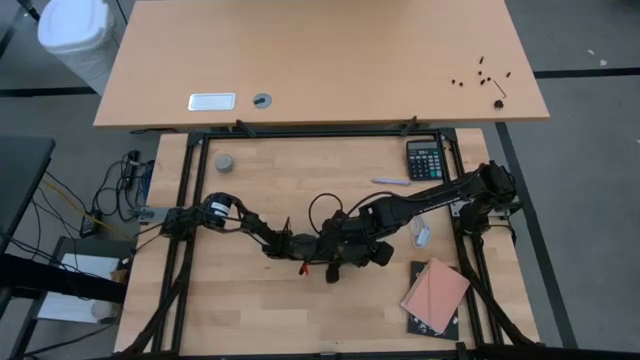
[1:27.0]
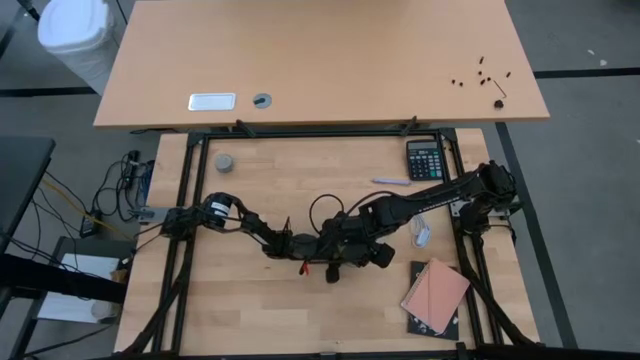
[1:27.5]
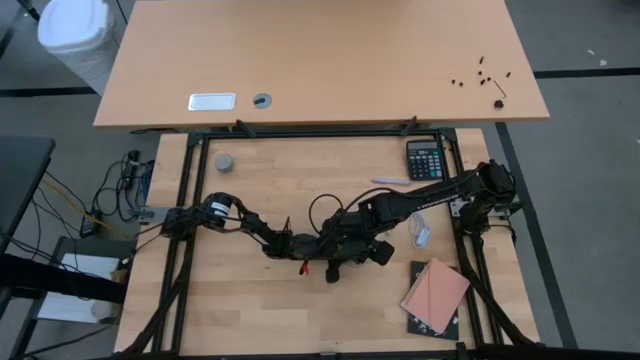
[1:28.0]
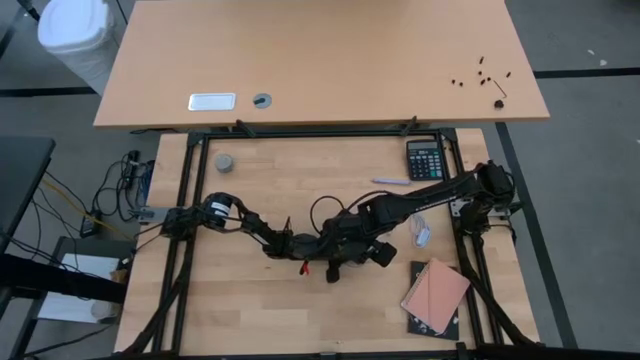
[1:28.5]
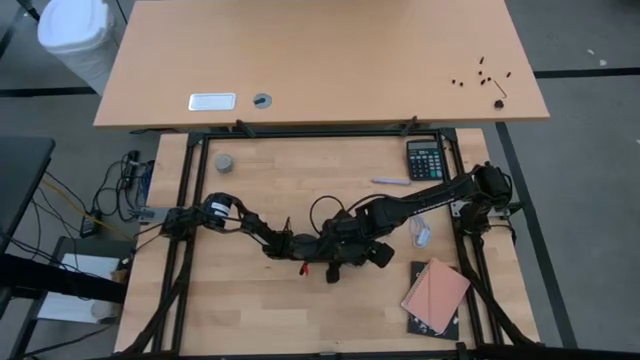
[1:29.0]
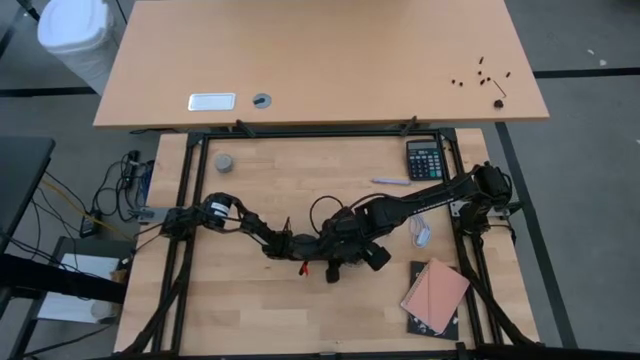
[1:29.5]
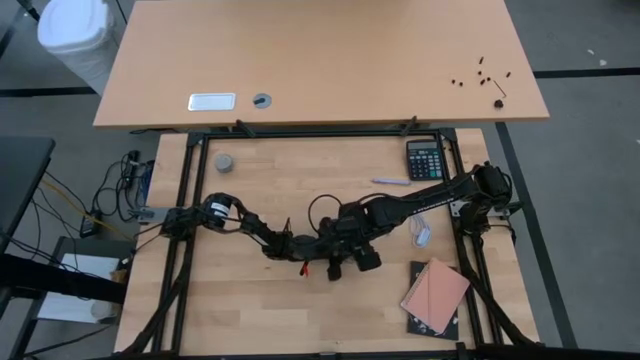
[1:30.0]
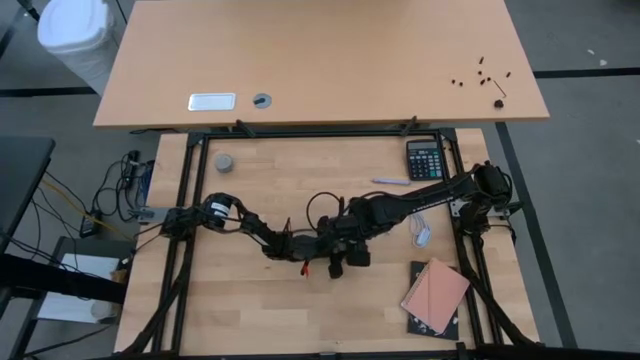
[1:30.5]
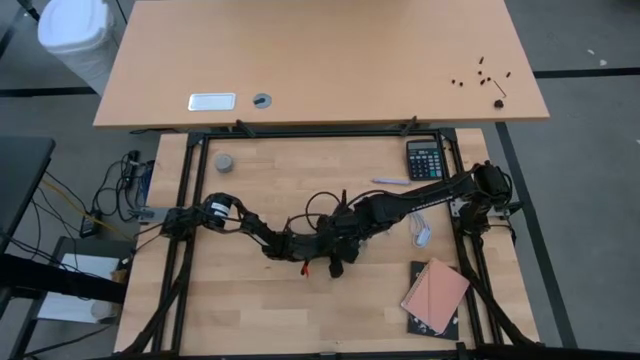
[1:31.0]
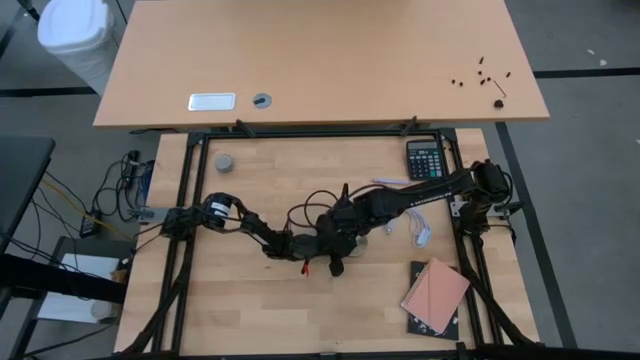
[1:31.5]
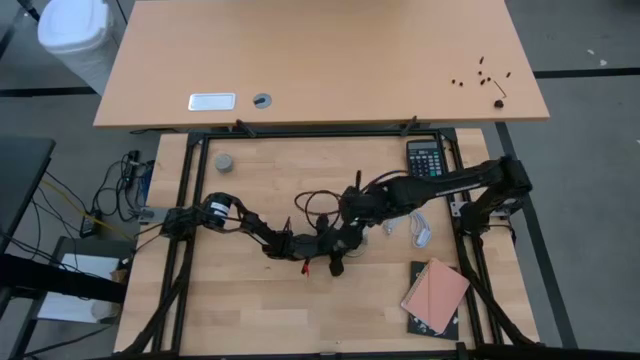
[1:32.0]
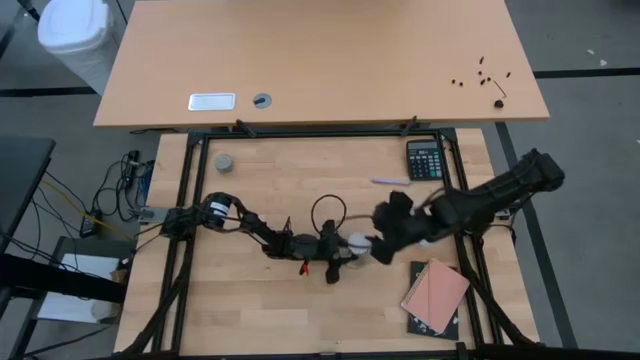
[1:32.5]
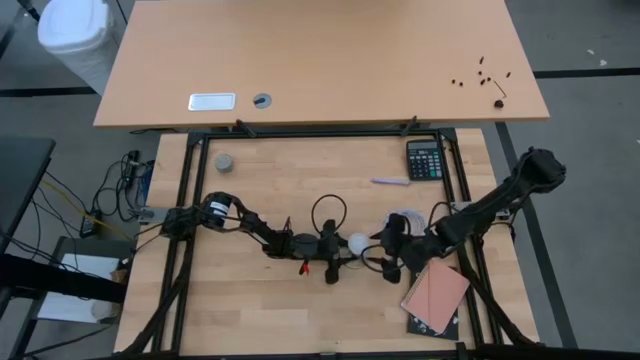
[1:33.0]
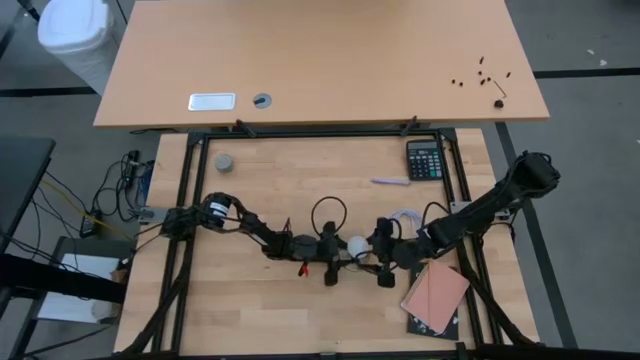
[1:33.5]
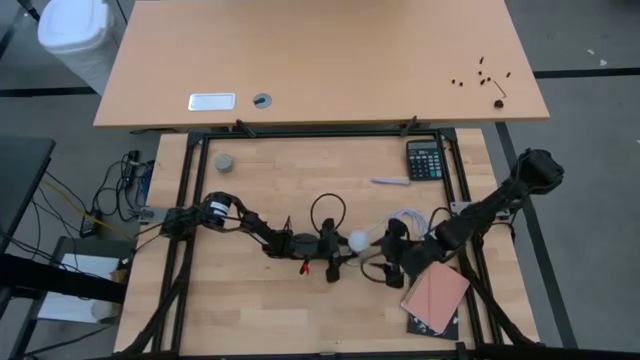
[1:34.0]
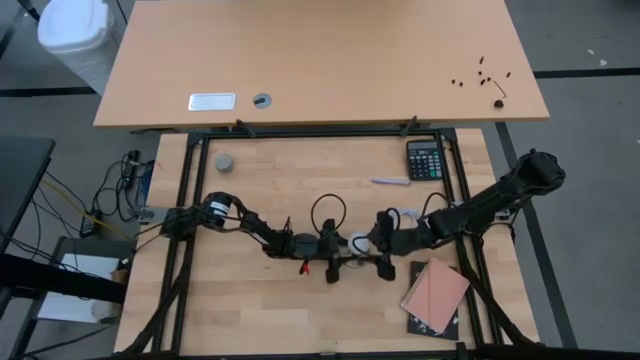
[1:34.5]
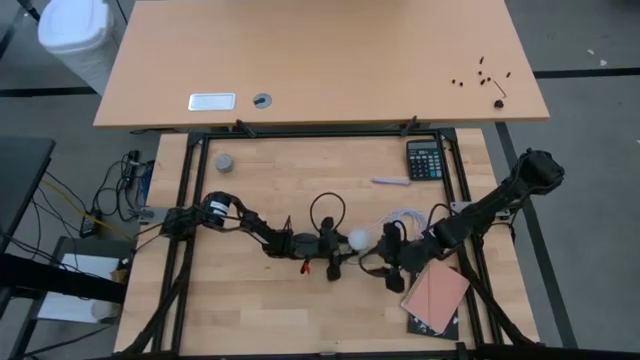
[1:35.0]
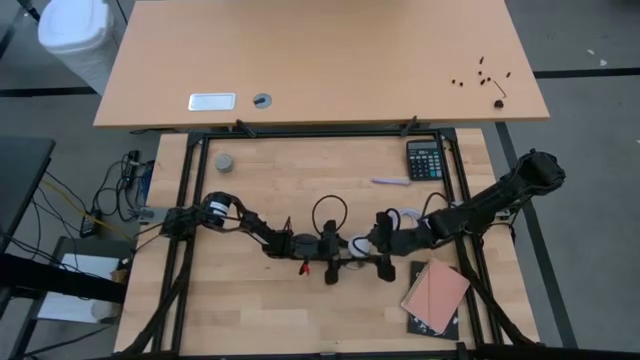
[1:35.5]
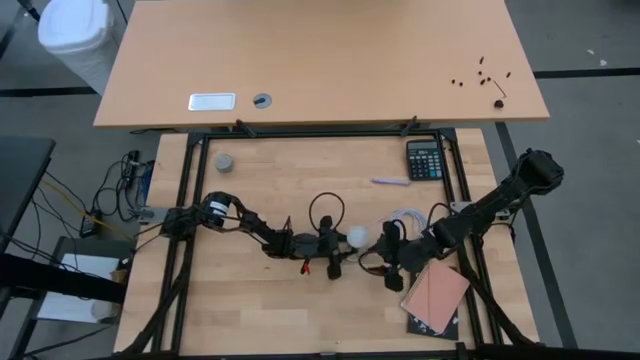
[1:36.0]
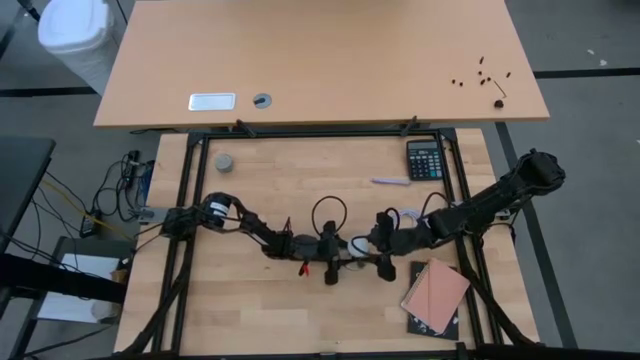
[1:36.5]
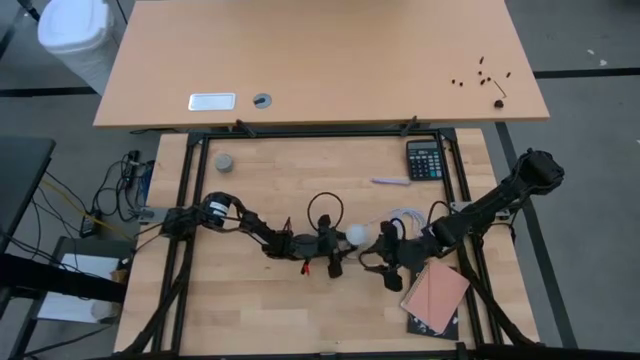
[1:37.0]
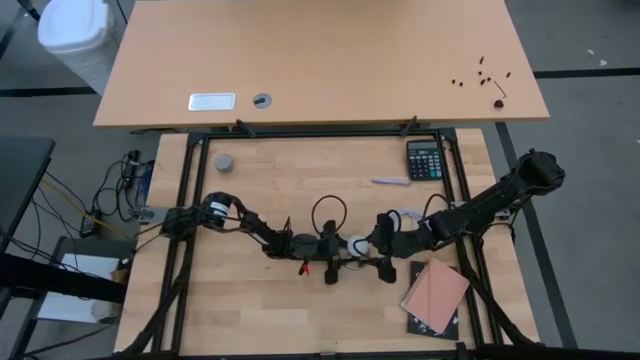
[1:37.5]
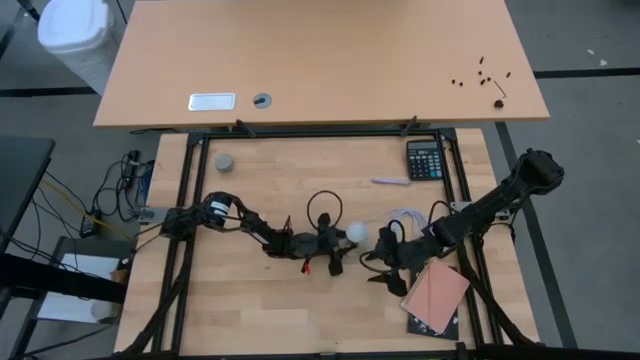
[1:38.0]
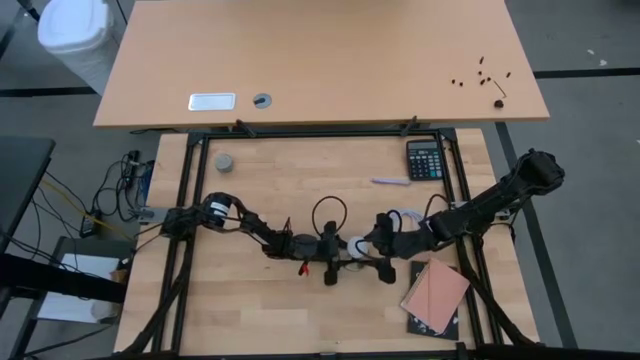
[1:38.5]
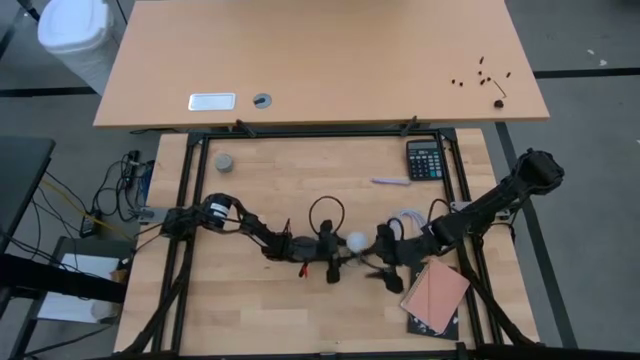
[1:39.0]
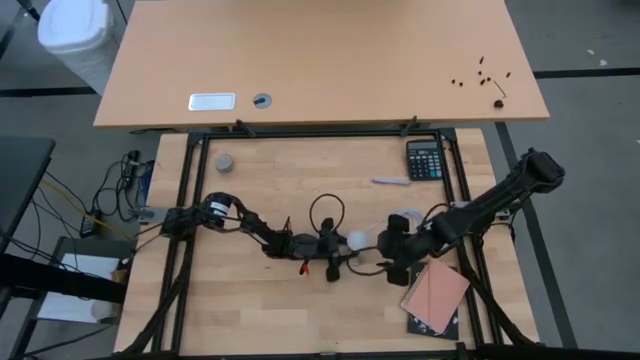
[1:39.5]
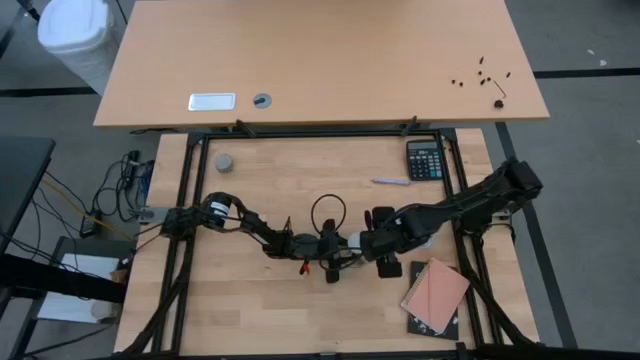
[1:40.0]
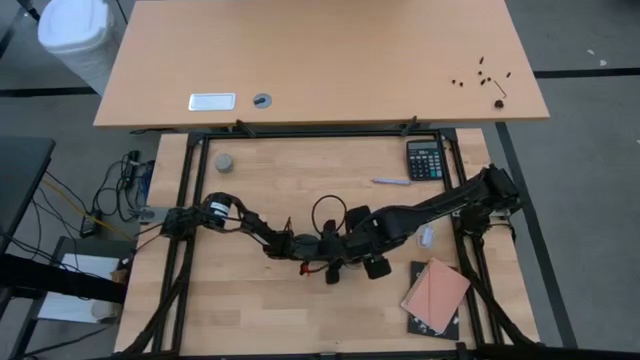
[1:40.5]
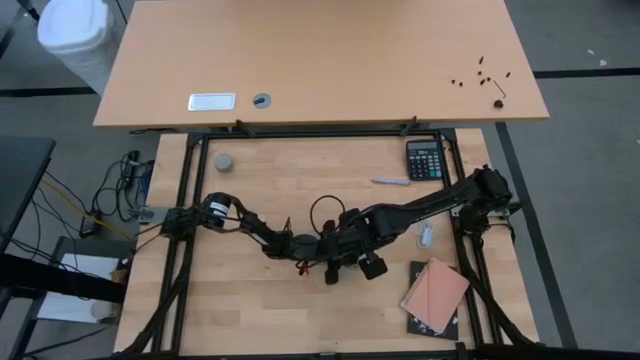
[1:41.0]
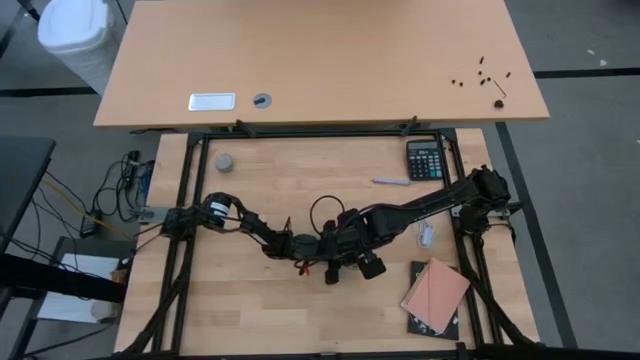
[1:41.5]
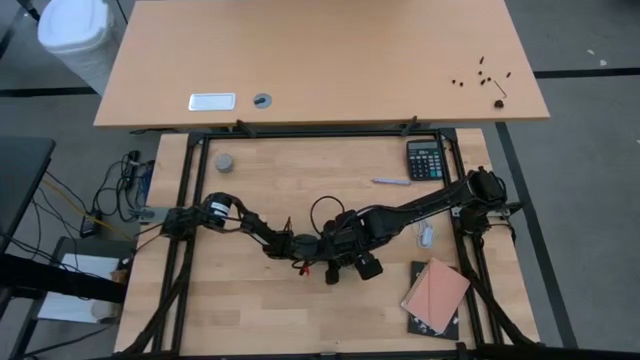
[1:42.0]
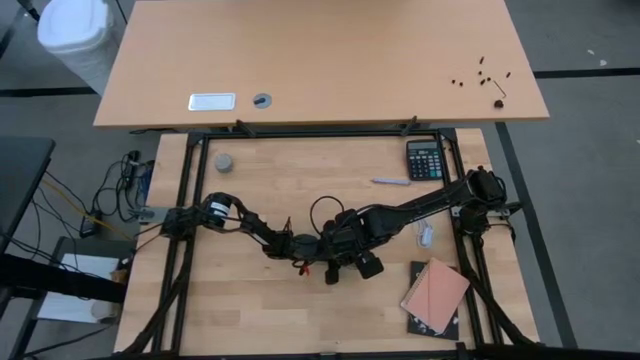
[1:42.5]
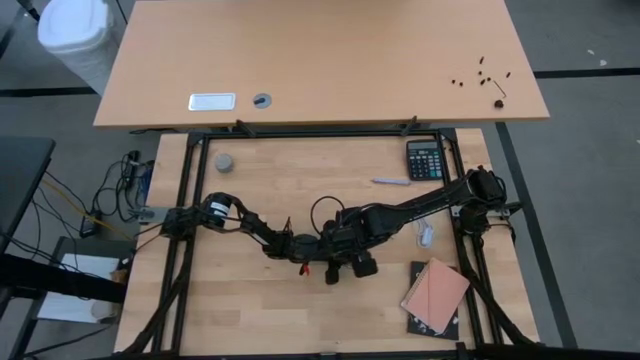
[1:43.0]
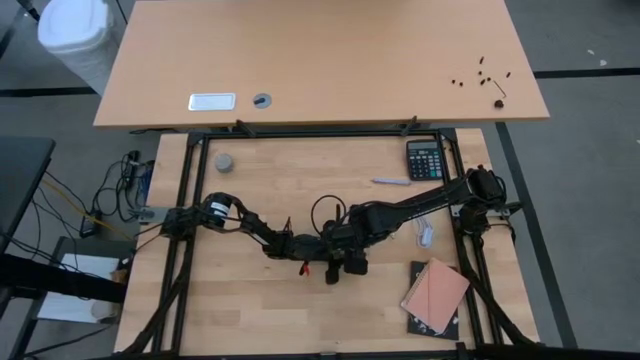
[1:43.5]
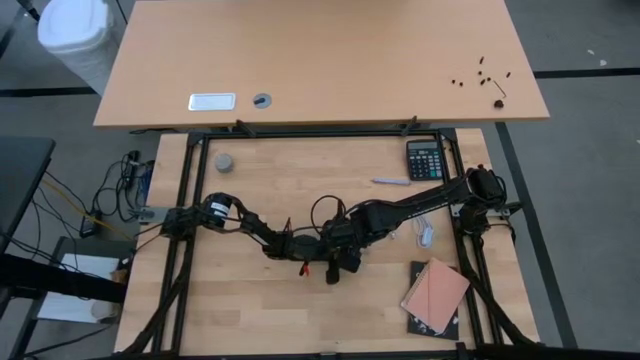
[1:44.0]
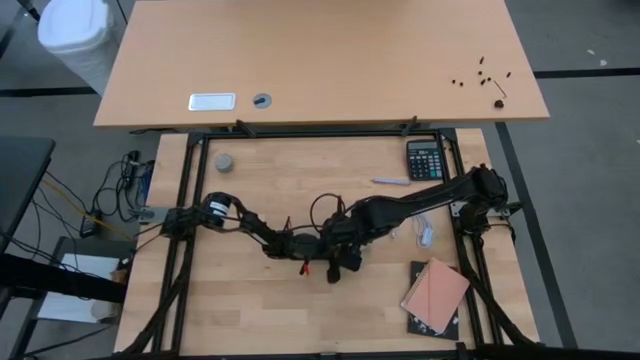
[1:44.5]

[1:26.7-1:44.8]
Task: Screw lightbulb
Insert the lightbulb into the bronze lamp socket

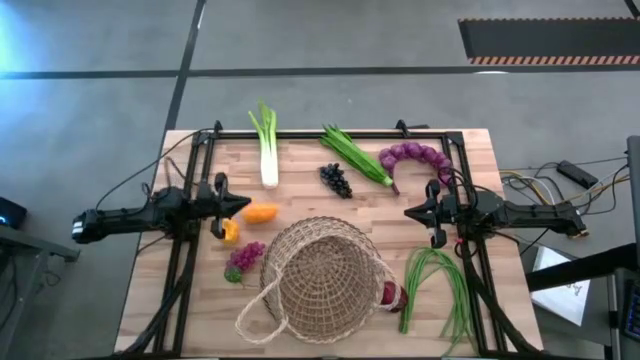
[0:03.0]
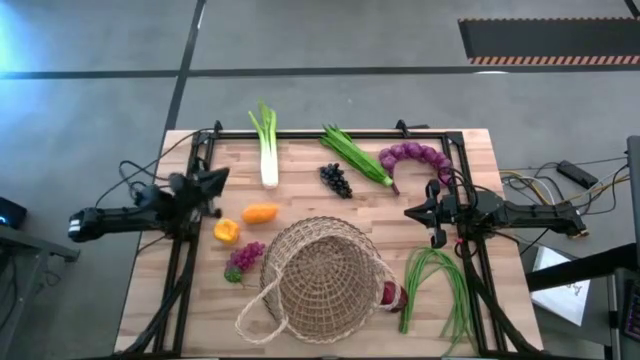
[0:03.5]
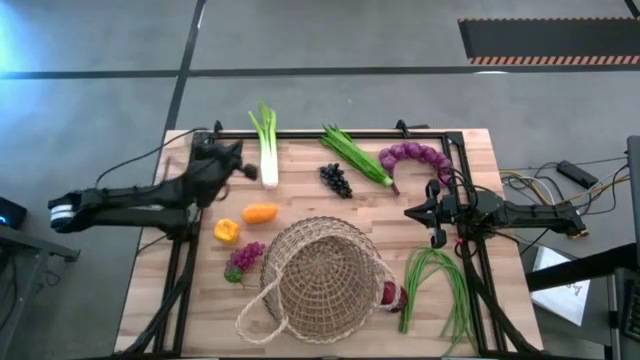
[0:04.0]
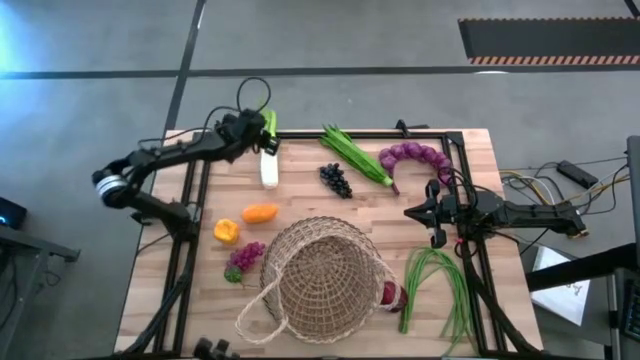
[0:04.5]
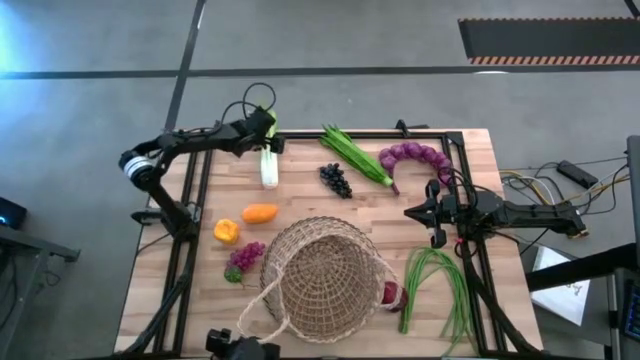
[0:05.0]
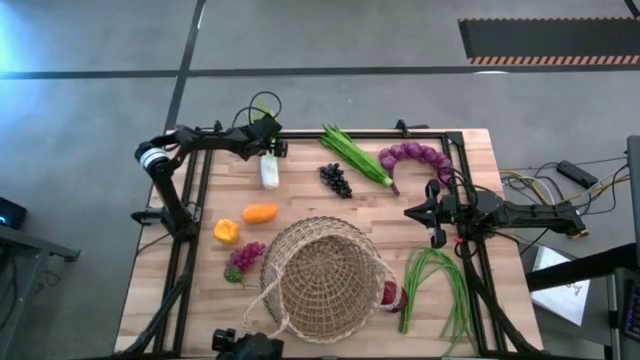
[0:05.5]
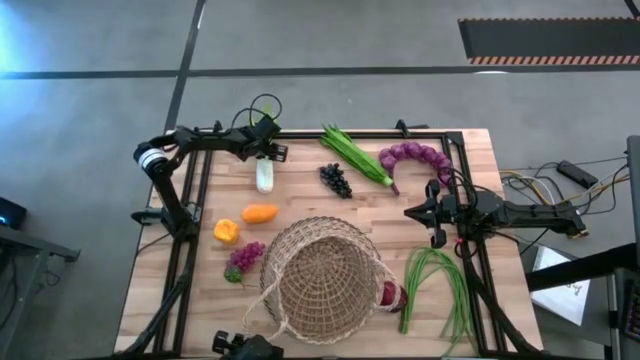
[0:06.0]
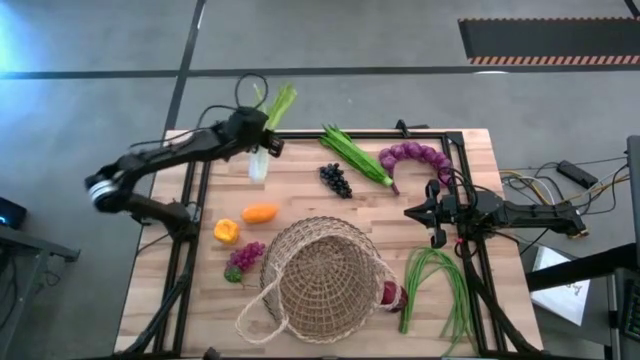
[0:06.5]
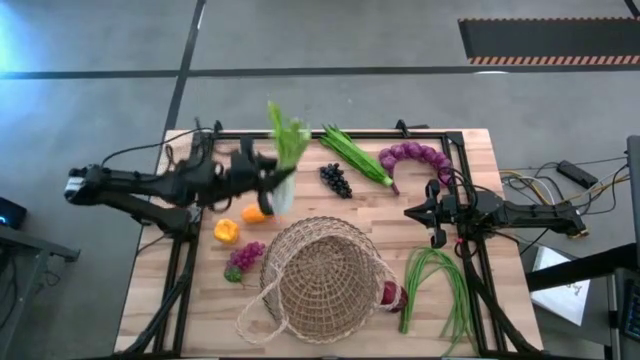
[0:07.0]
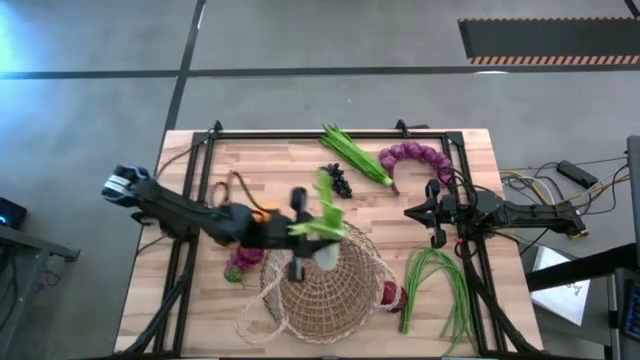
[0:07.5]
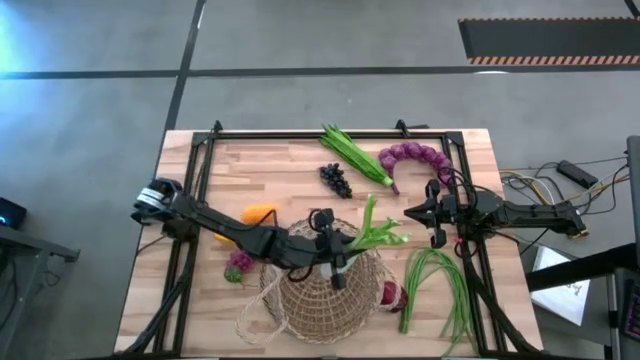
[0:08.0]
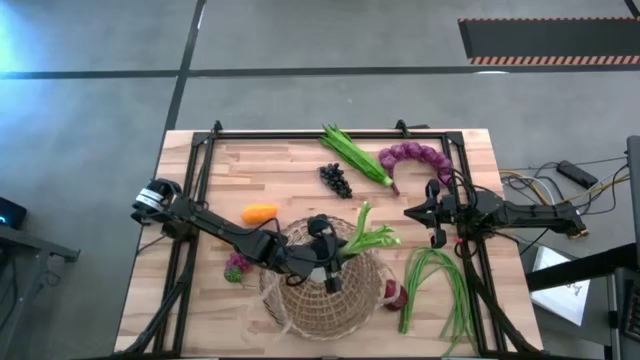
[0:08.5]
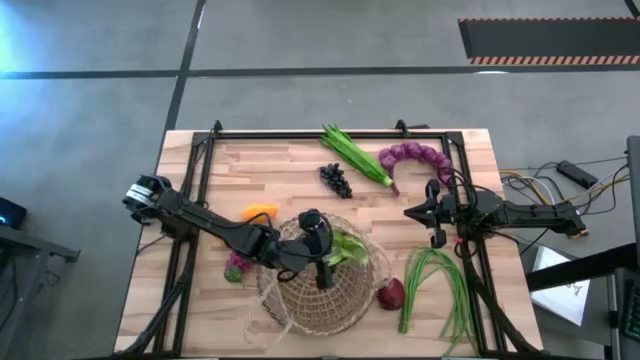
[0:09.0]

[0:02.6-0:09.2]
Task: Build produce basket
Put the celery into the basket
